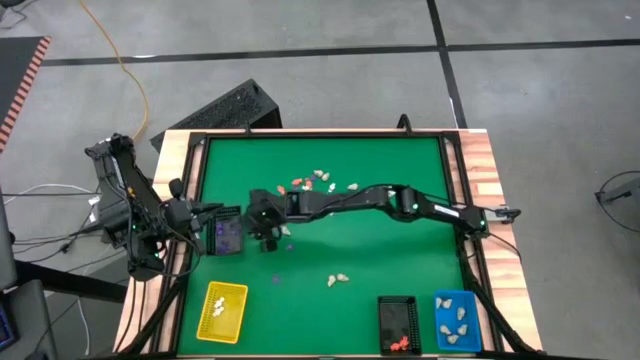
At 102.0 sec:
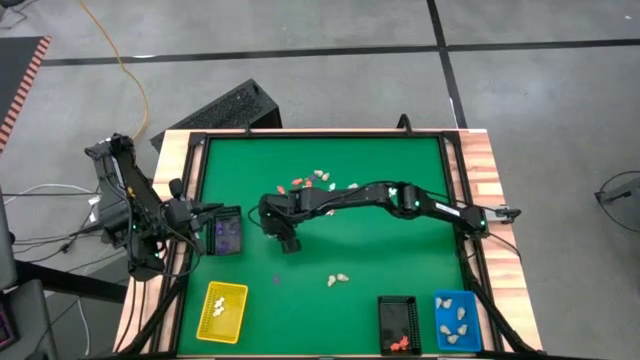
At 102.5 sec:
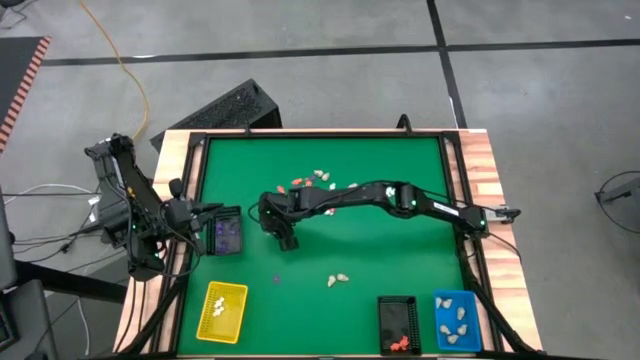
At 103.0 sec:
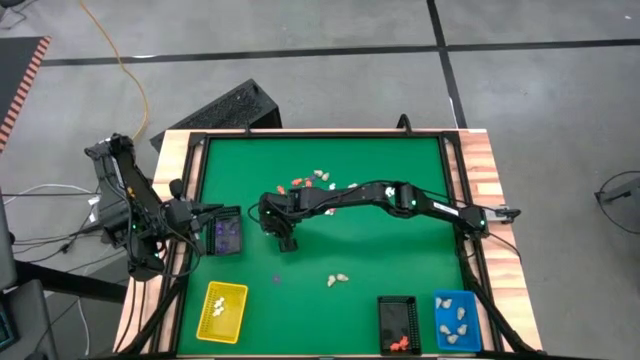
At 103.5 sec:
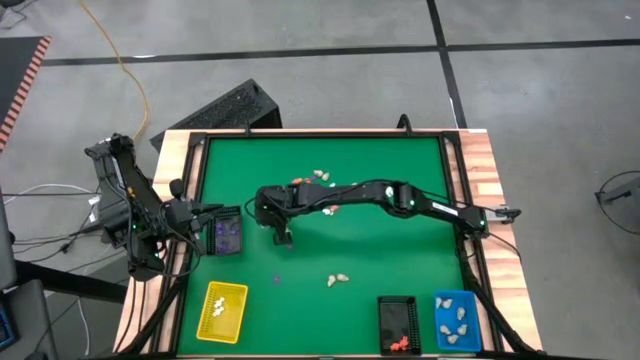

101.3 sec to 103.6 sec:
Task: Sort Halloween decoration
Put the purple spider toy into the top black basket

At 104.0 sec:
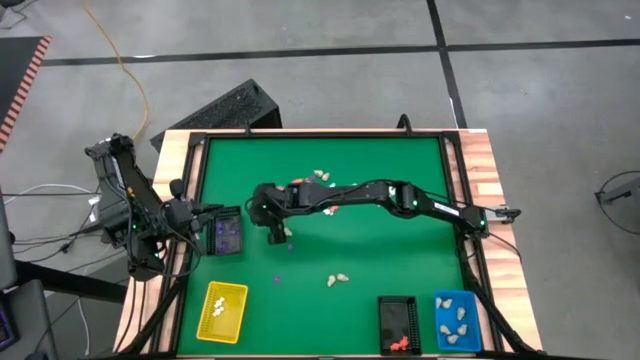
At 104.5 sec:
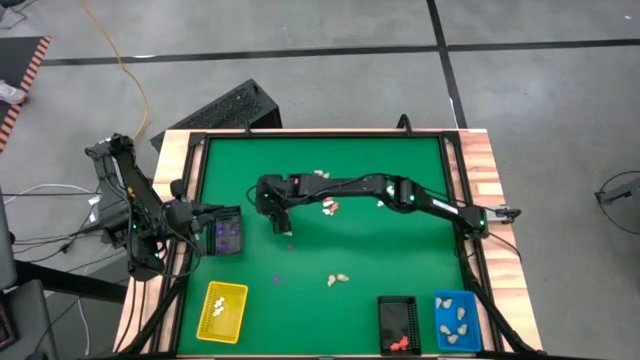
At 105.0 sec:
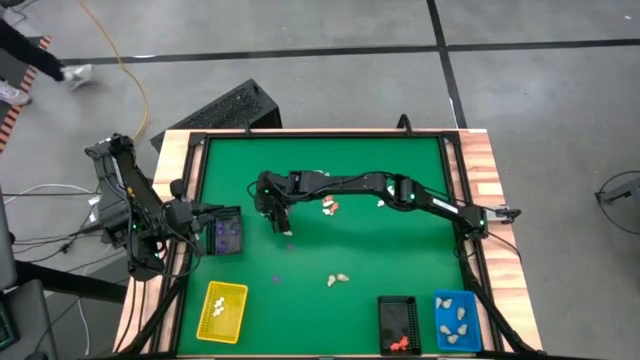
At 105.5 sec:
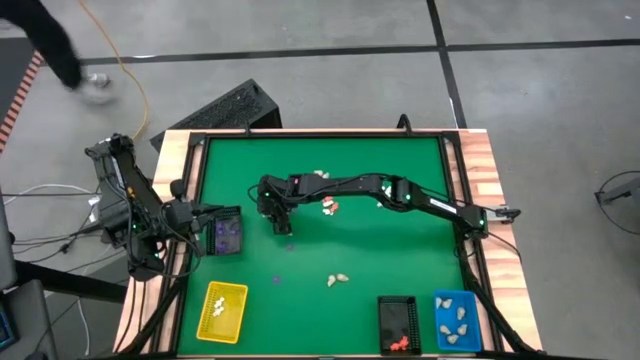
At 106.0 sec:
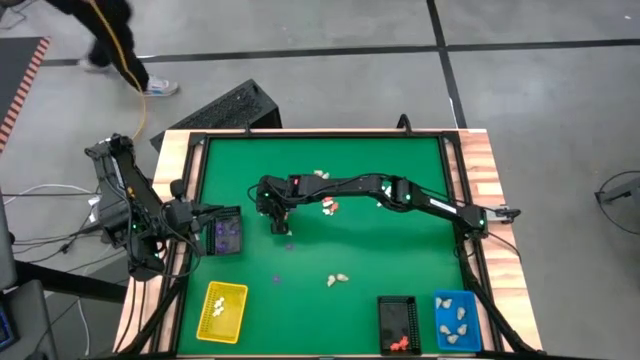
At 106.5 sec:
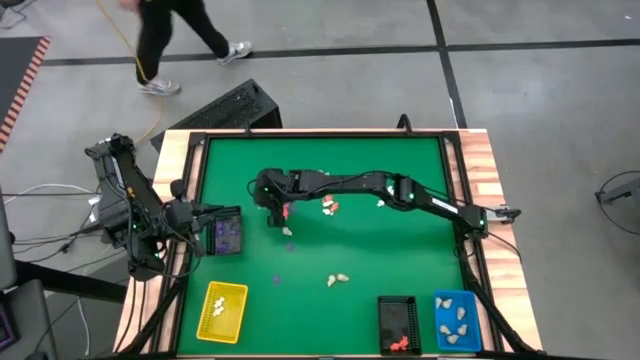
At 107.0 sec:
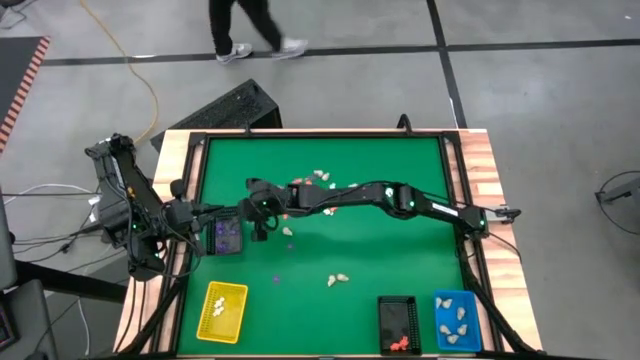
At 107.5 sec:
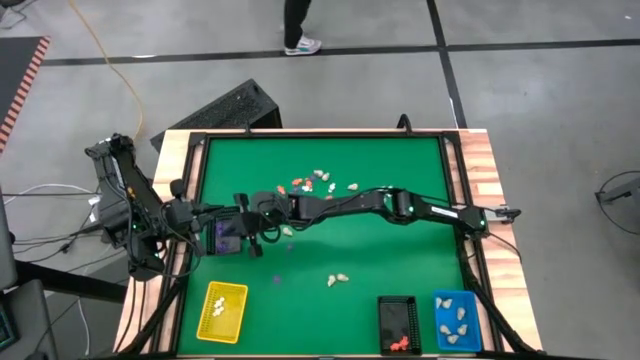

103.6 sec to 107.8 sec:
Put the purple spider toy into the top black basket

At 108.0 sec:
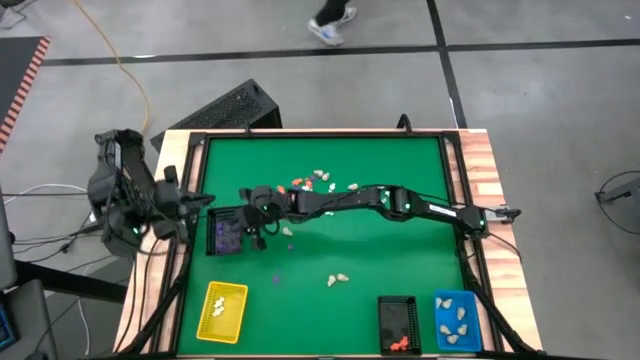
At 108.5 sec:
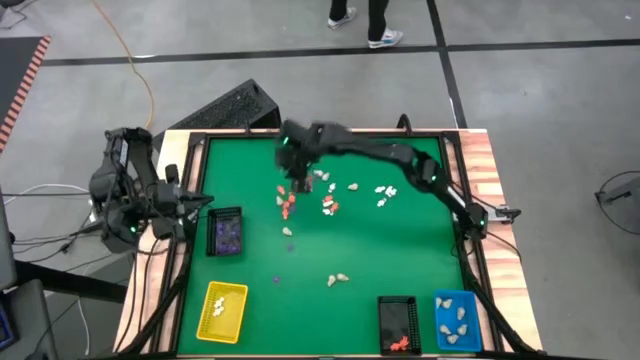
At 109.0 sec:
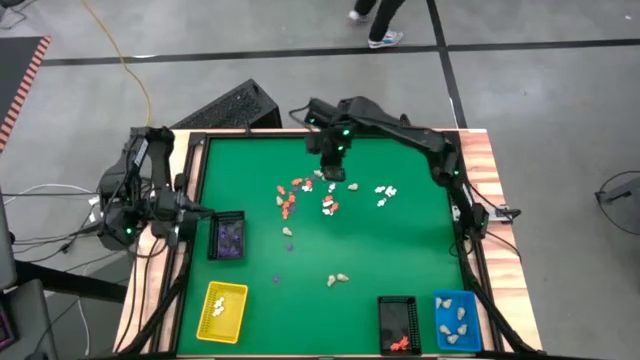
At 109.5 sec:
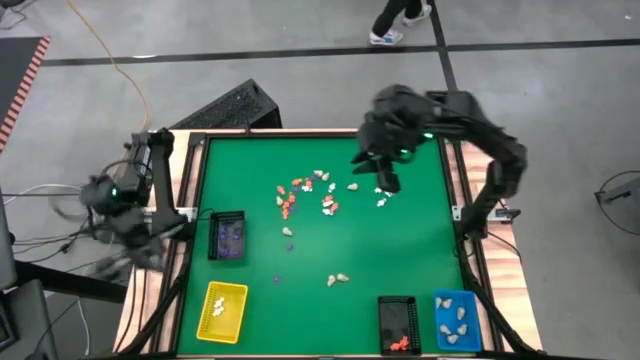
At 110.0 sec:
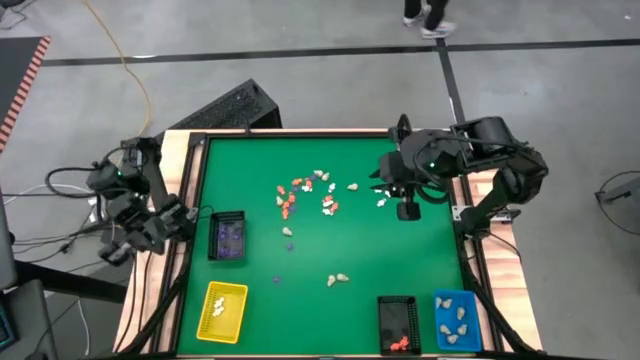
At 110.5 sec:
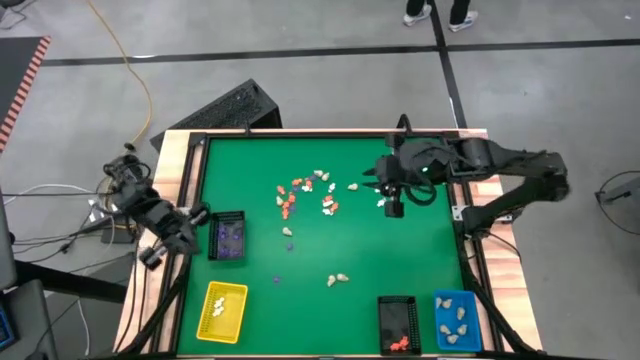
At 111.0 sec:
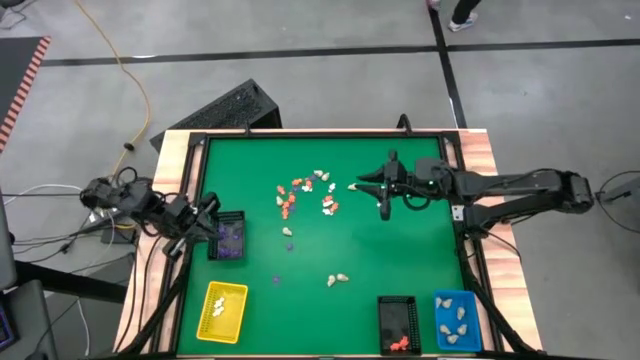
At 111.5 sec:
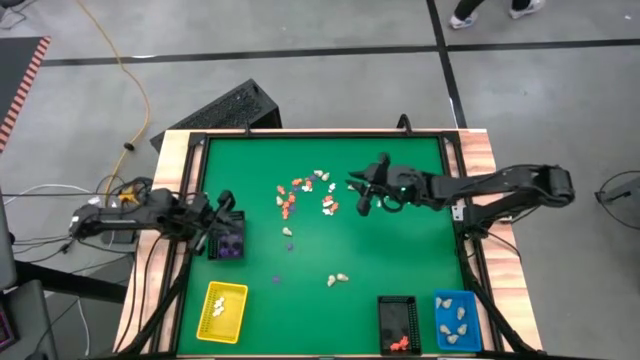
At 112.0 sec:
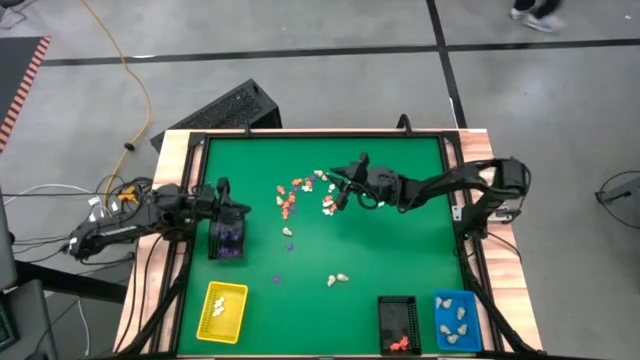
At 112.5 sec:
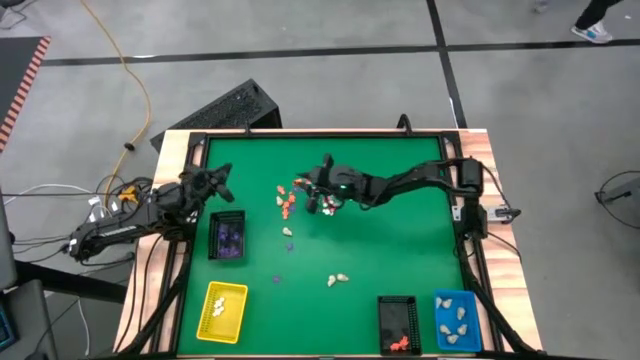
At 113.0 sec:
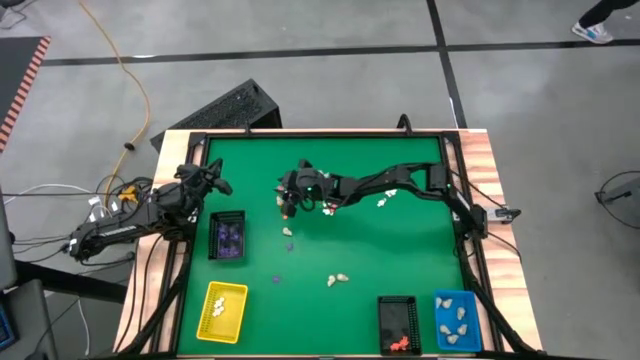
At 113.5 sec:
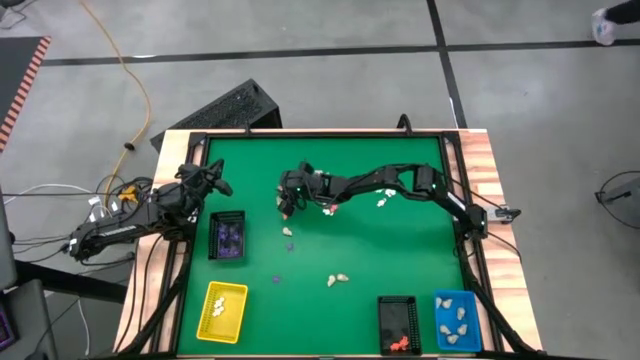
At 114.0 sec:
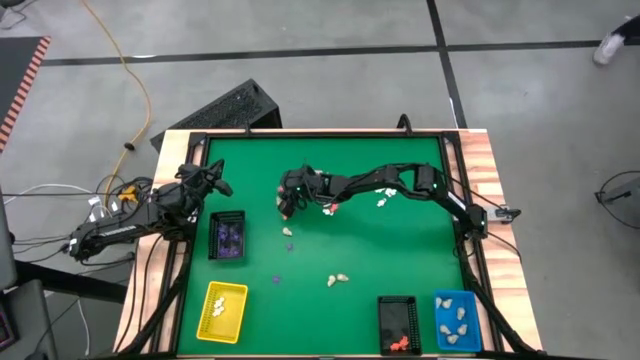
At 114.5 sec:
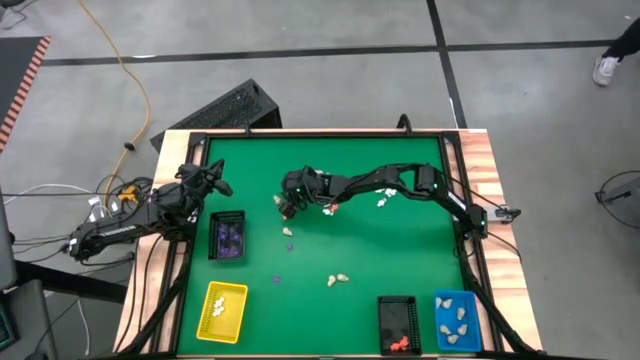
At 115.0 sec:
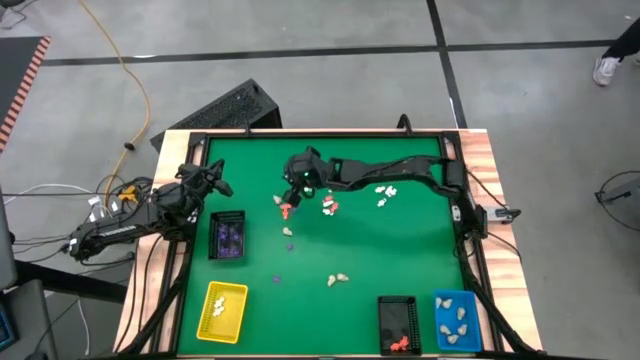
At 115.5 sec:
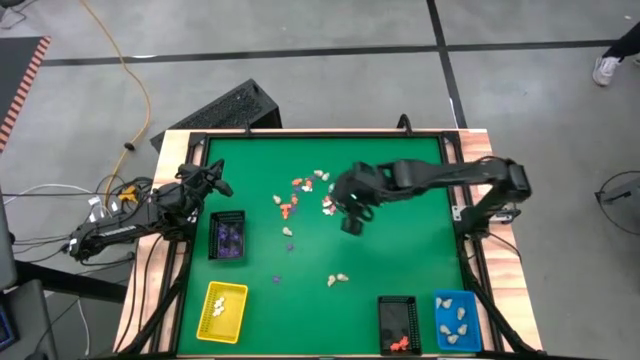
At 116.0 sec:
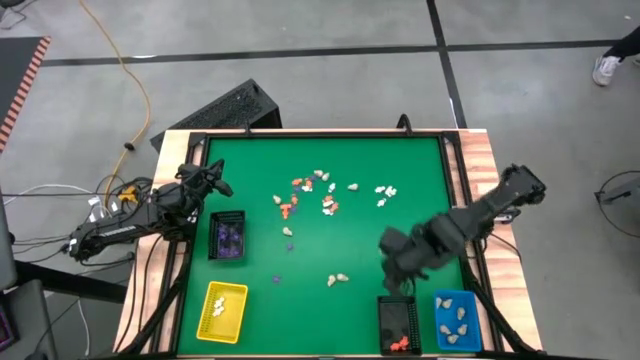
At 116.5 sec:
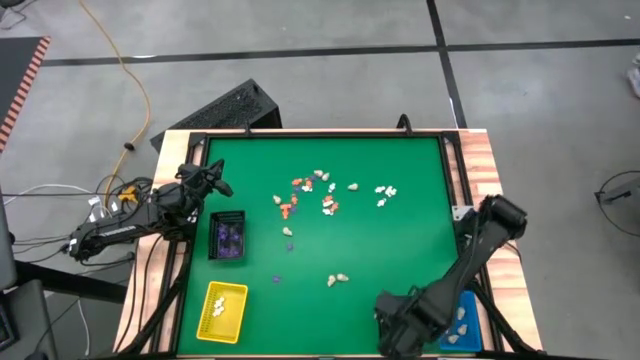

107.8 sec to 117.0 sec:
Put the orange skeleton toy into the bottom black basket

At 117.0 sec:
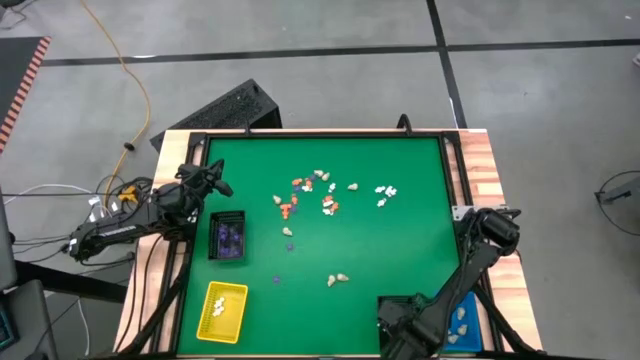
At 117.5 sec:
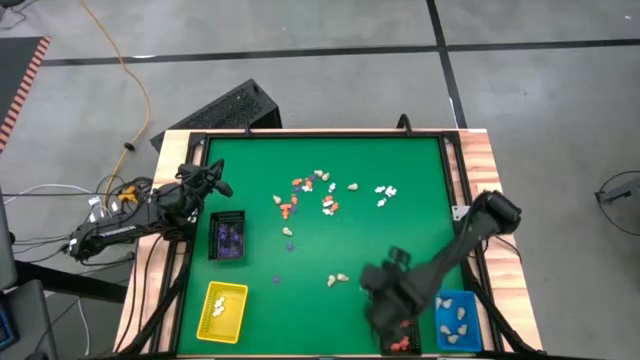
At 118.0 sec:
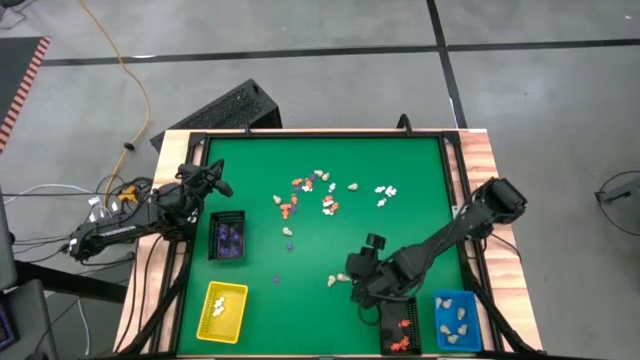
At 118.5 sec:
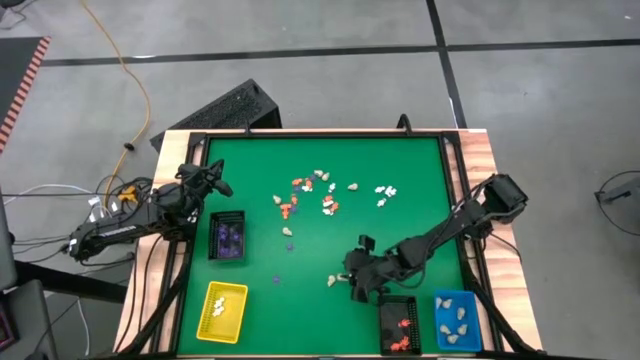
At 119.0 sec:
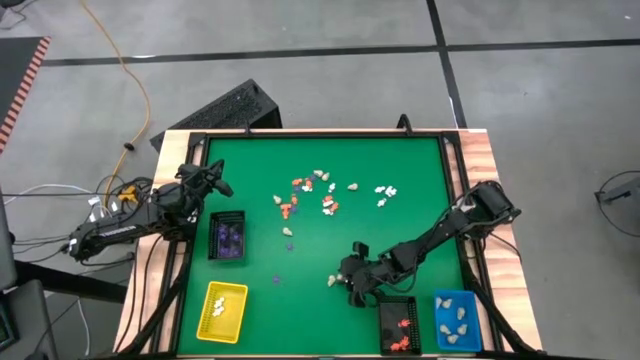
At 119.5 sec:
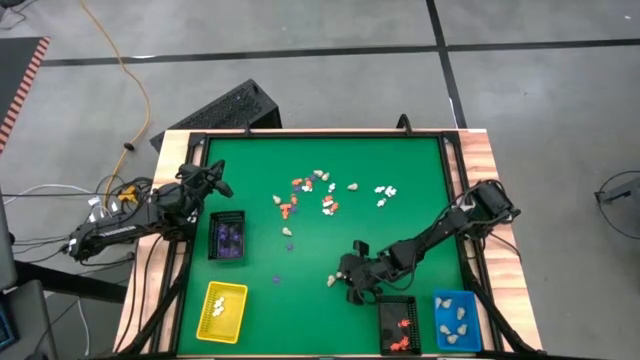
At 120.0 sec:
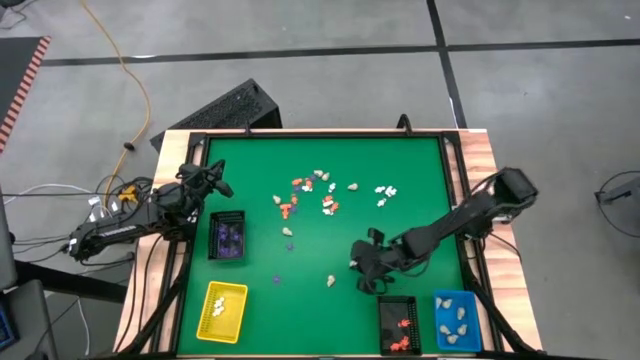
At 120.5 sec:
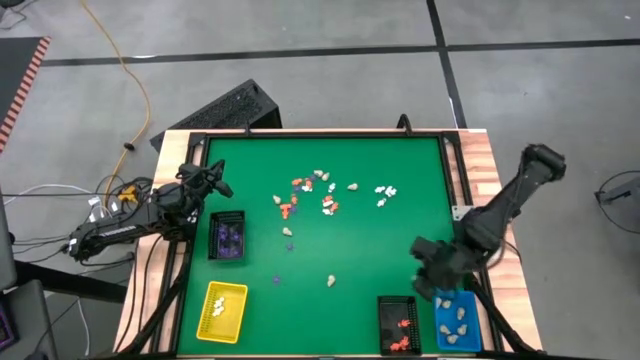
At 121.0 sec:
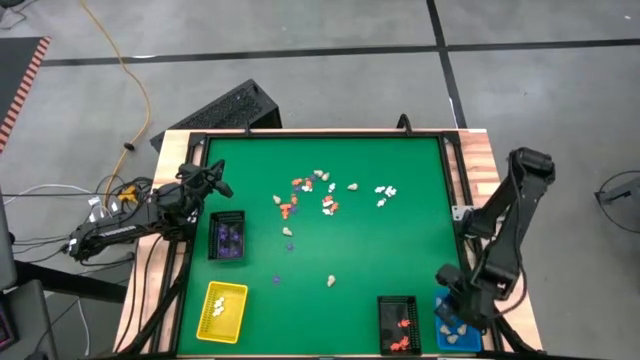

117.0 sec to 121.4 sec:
Put the white skull toy into the blue basket

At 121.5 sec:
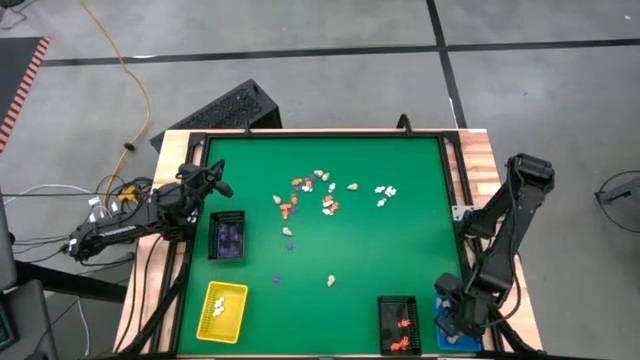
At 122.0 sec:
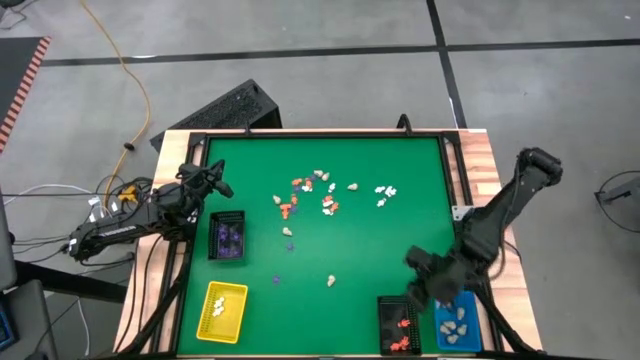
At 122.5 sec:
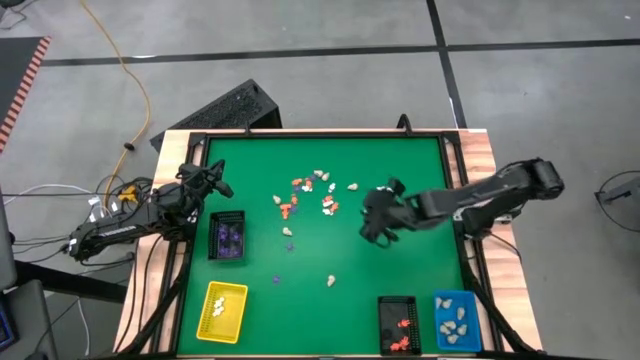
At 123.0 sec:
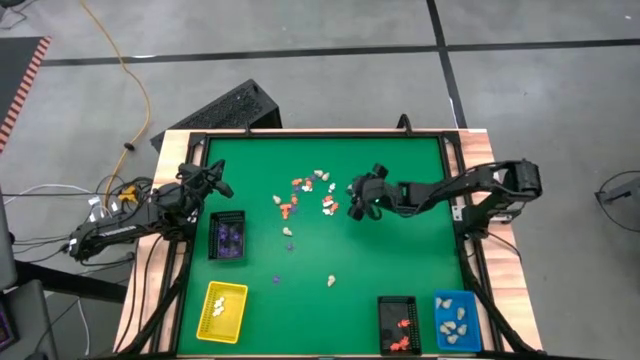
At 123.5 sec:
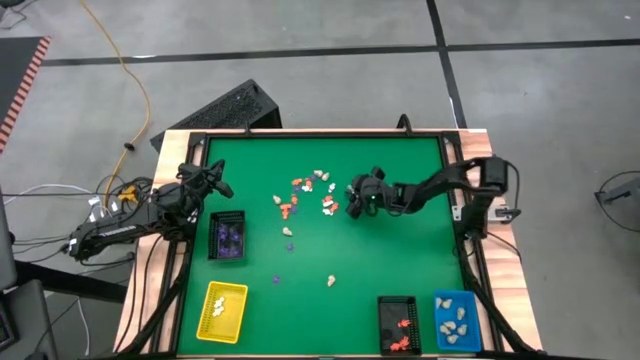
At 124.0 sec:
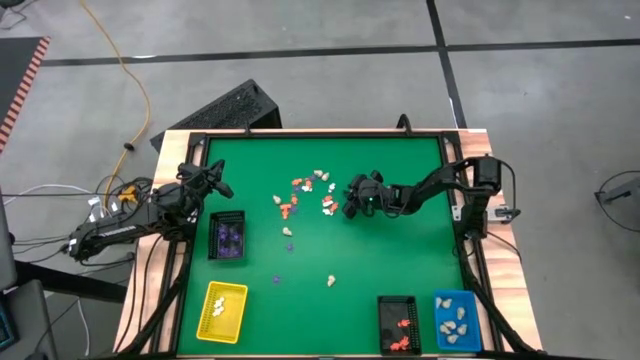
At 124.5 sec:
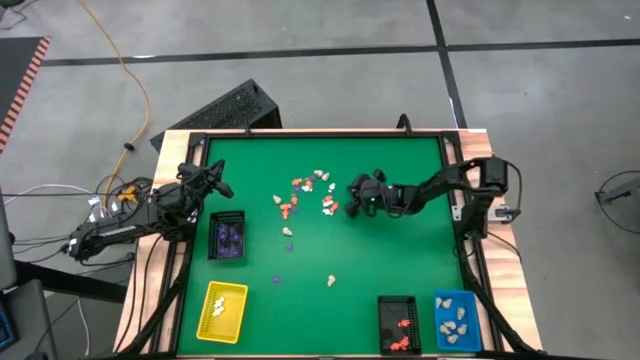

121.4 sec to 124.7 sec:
Put the white skull toy into the blue basket
